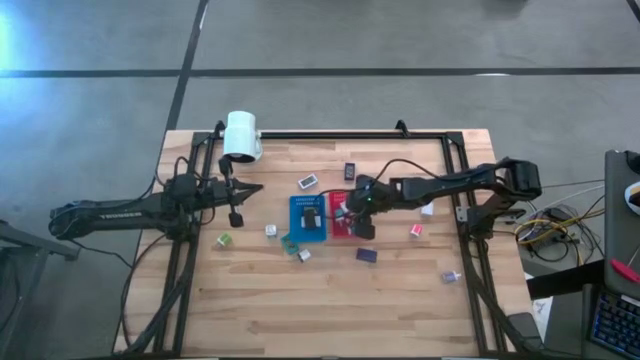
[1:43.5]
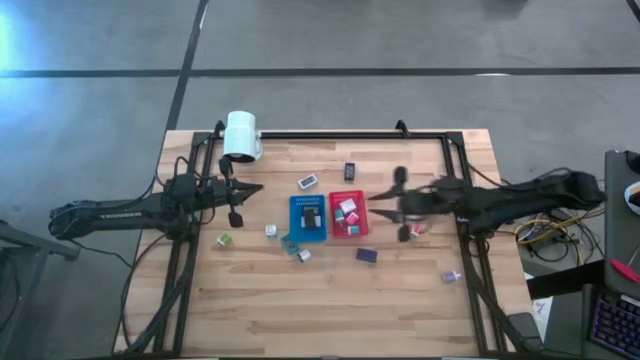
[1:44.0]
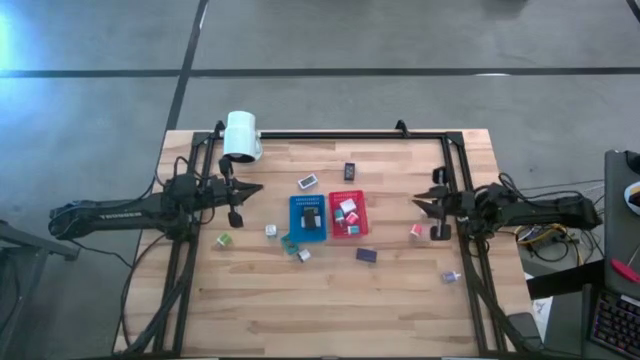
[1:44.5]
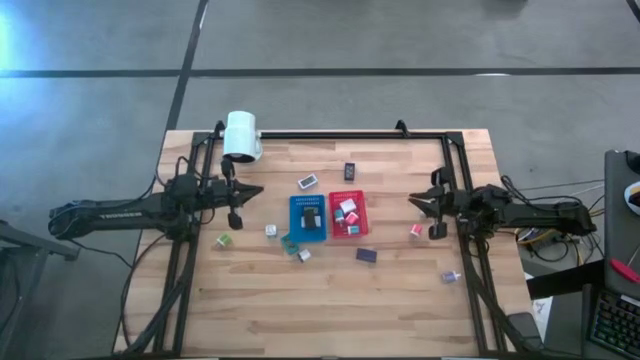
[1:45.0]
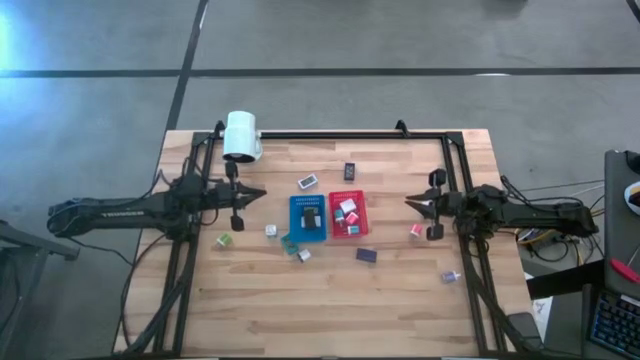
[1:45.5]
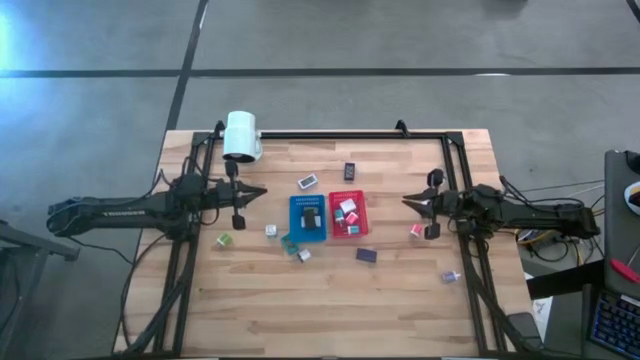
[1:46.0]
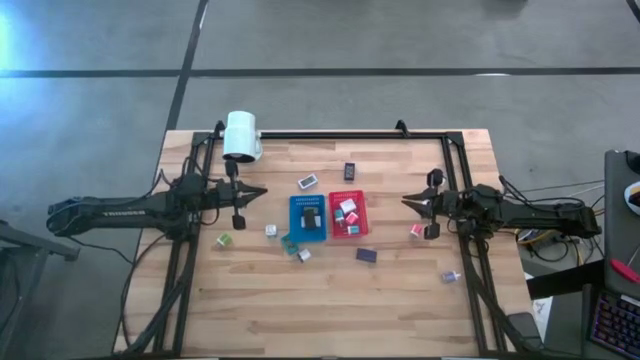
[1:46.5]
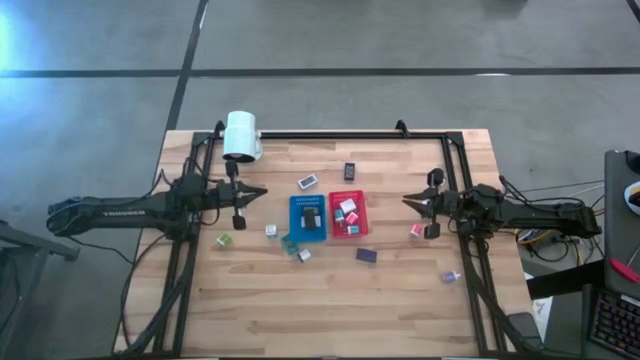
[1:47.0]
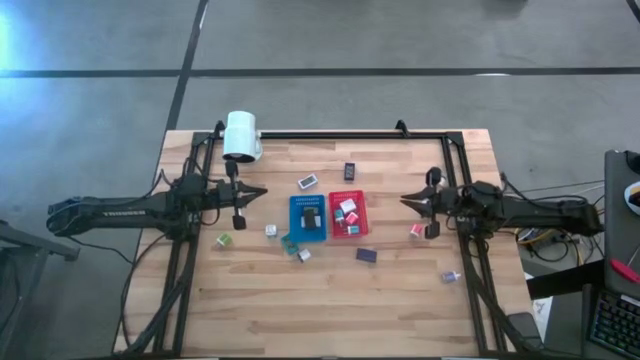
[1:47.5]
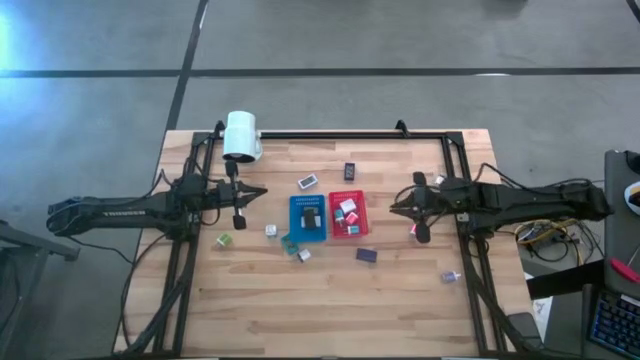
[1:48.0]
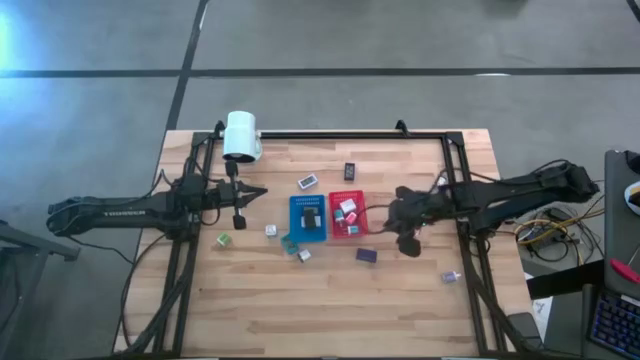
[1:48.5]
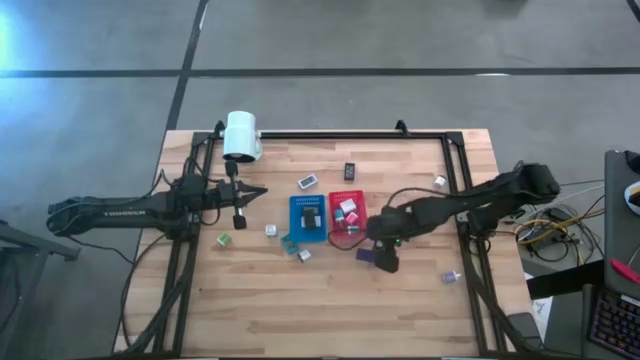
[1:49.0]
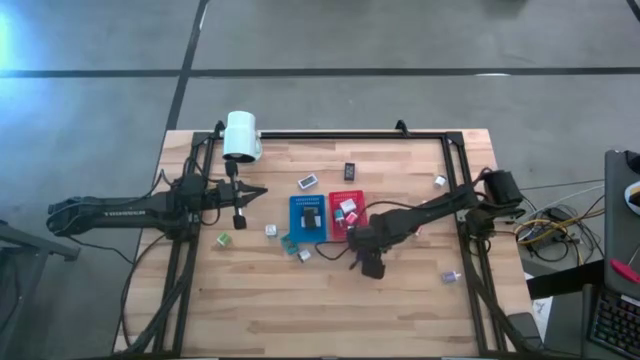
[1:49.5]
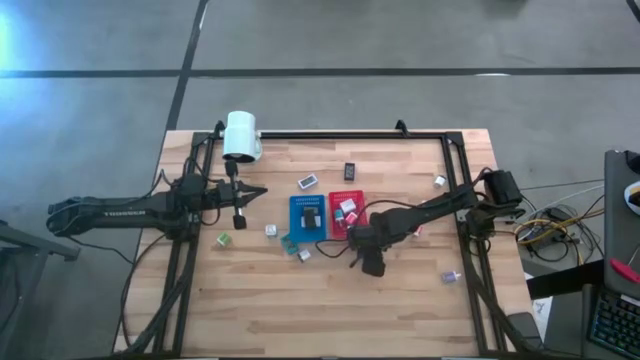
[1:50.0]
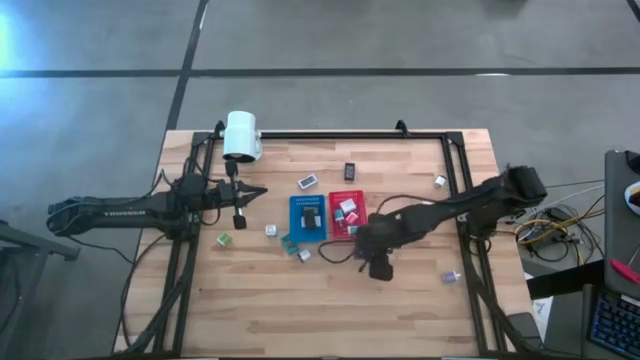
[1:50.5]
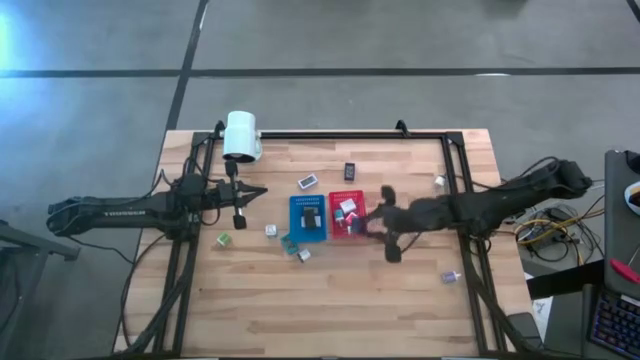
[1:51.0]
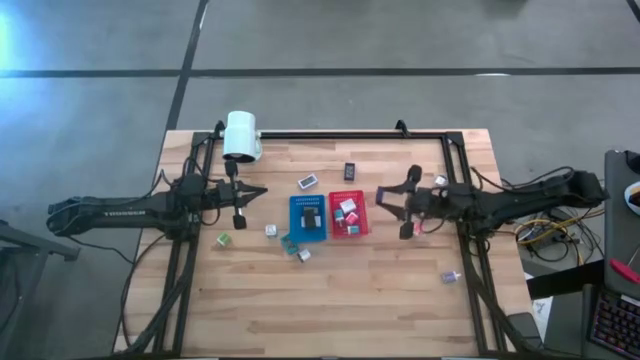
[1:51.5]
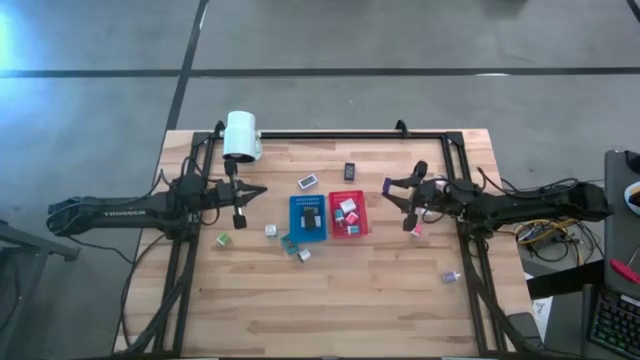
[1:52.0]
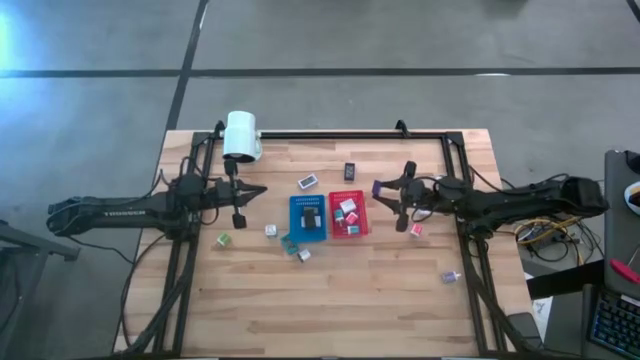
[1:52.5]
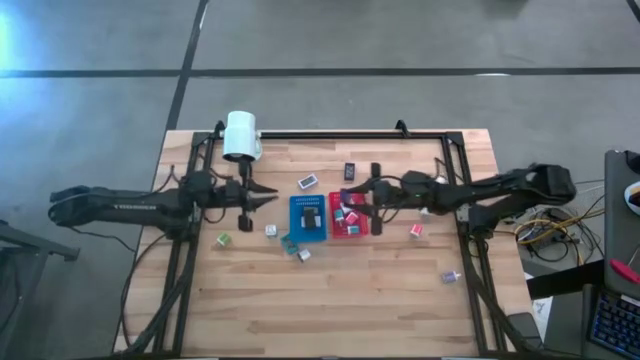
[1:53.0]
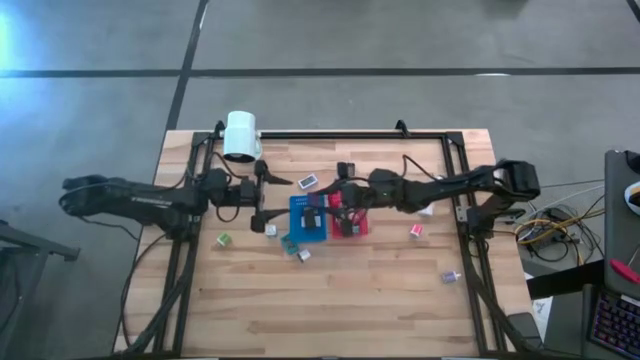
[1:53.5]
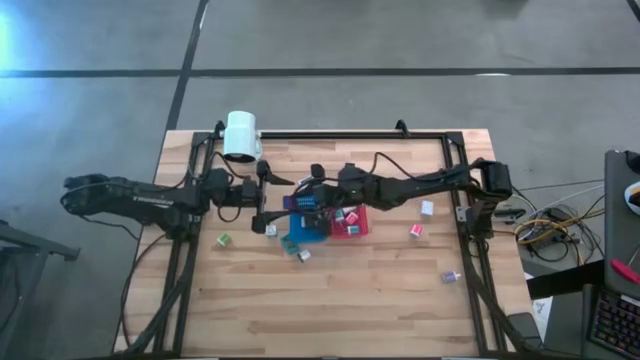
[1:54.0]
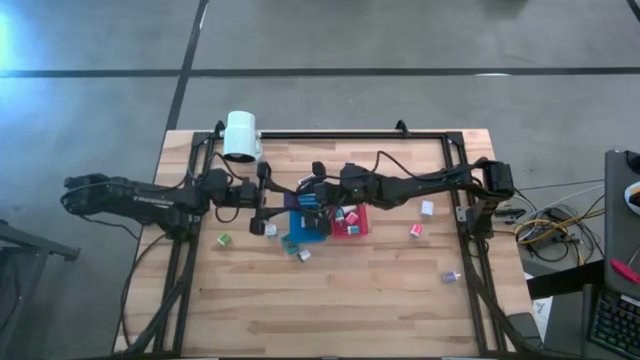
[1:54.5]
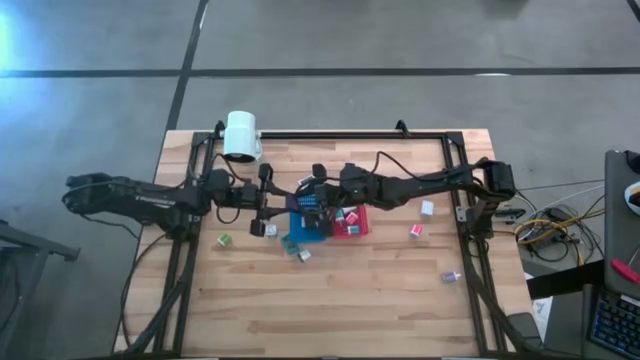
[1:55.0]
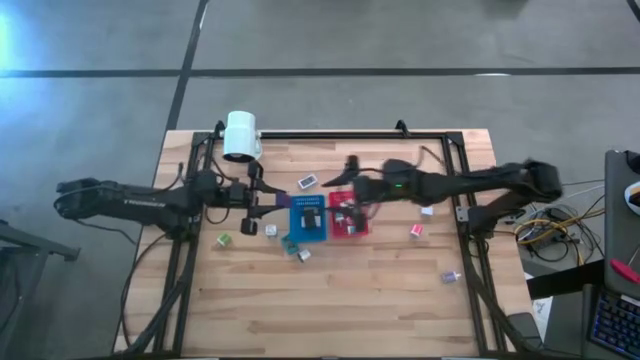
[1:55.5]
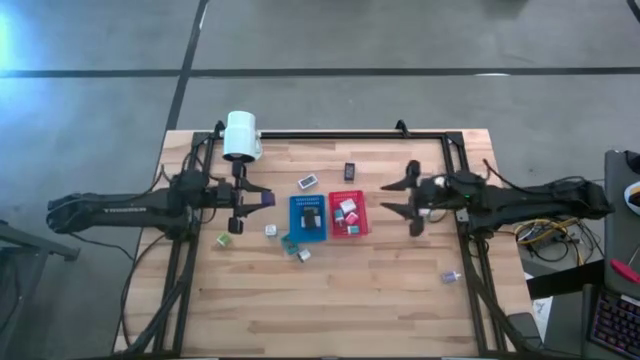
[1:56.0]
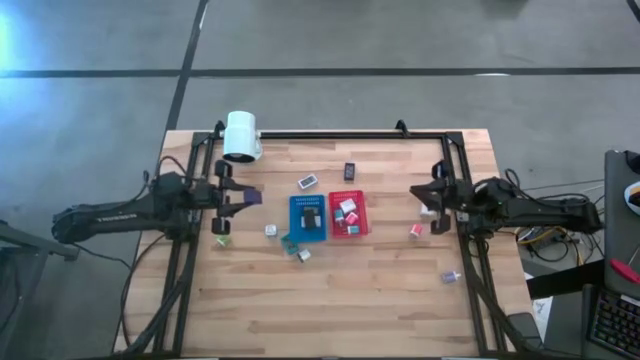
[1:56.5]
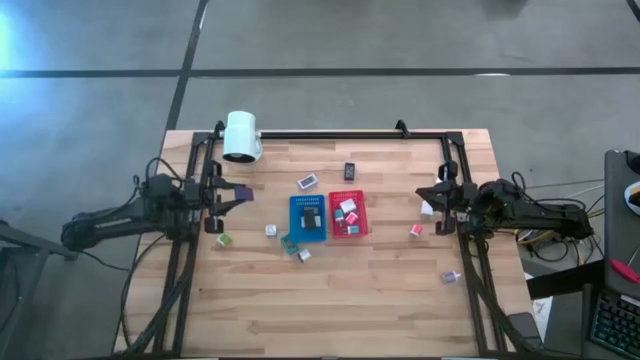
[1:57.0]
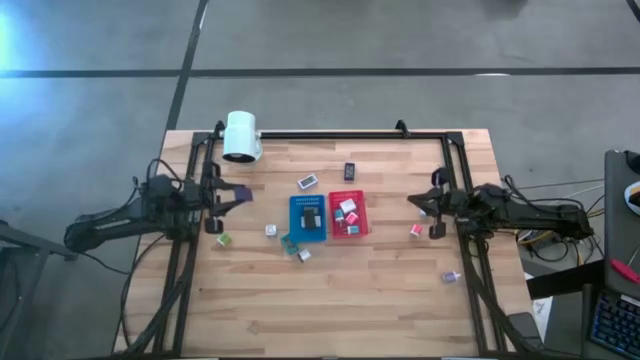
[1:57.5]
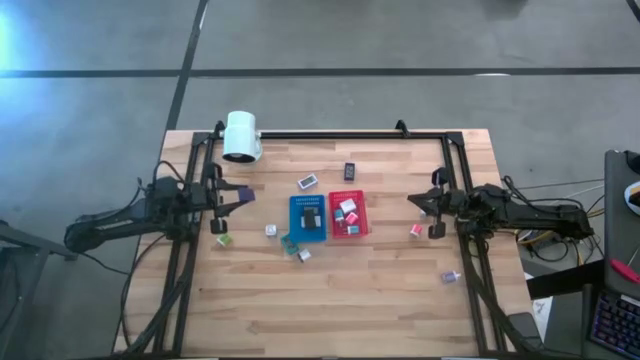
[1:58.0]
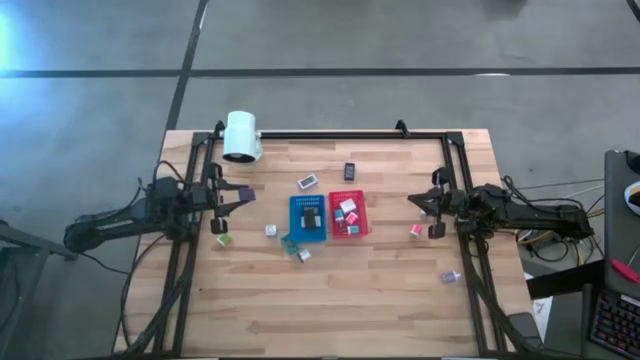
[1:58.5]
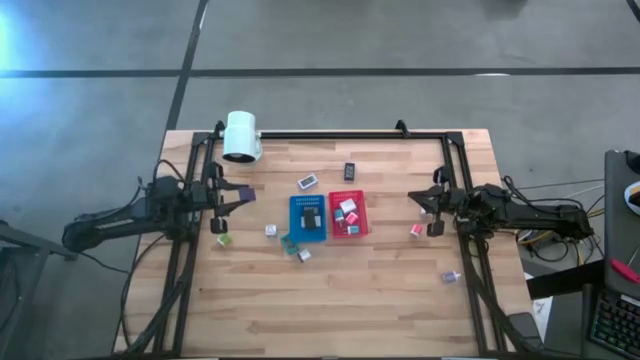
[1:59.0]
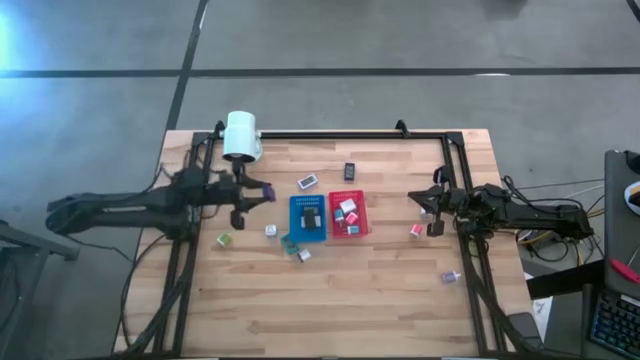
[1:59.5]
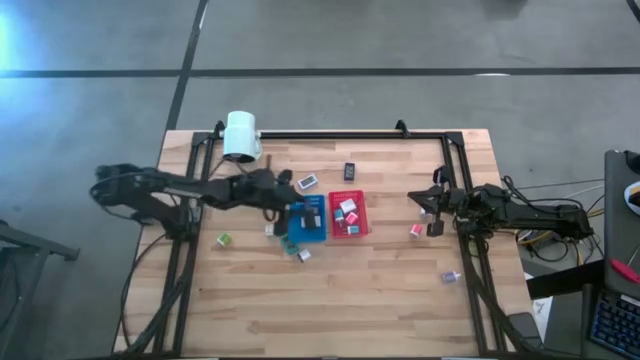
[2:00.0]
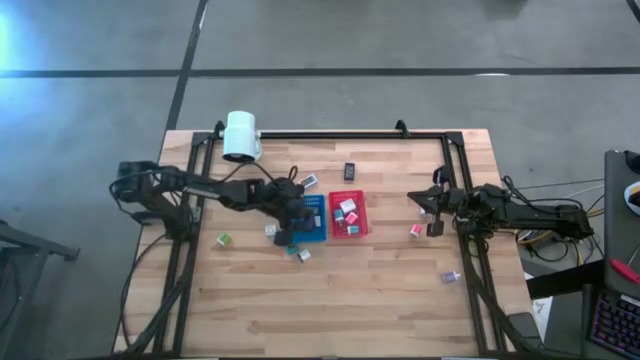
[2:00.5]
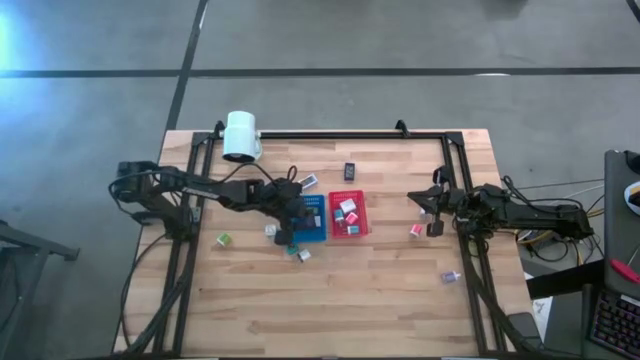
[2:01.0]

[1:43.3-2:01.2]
Task: Pick & Place Office items
Put the bottom dark blue digital clock into the blue bin

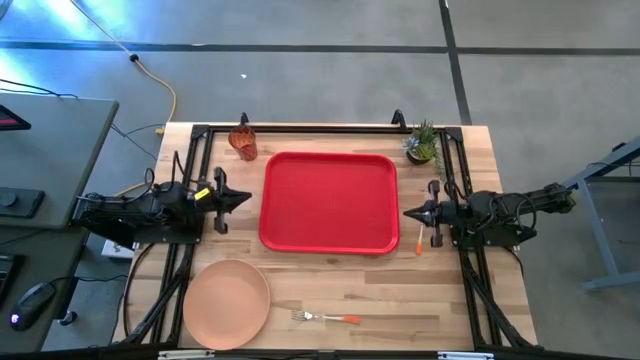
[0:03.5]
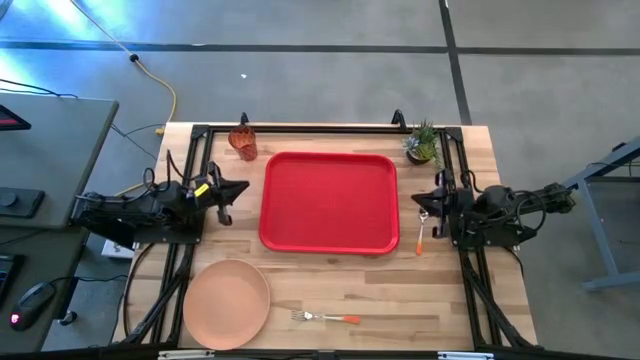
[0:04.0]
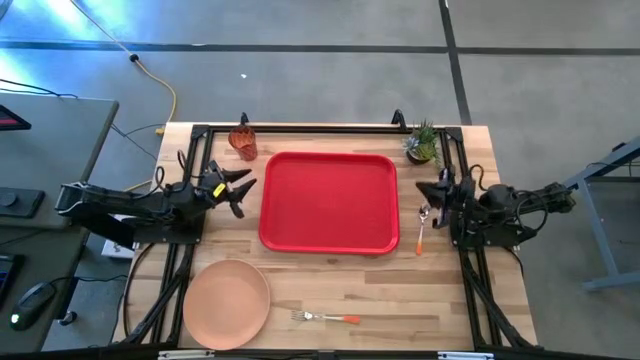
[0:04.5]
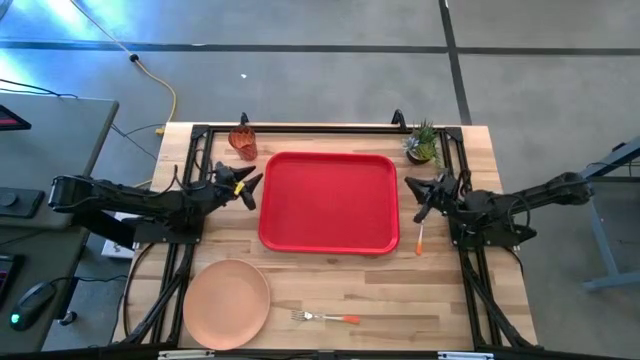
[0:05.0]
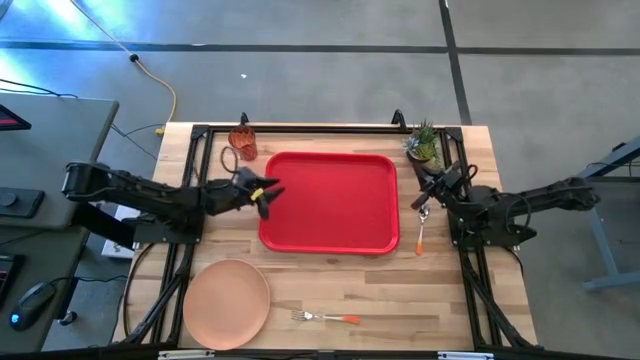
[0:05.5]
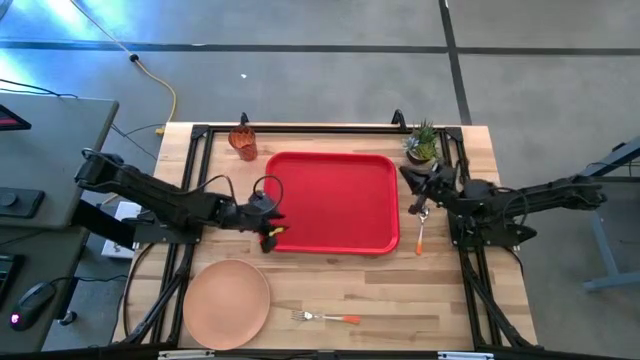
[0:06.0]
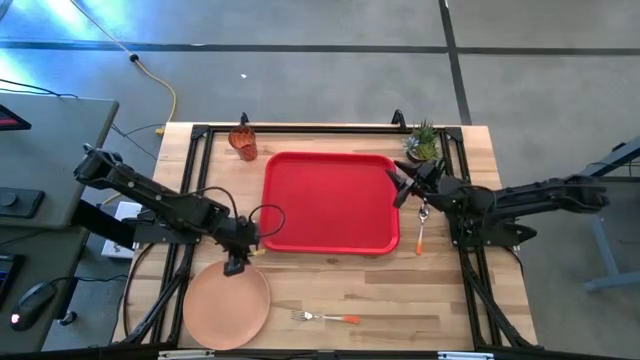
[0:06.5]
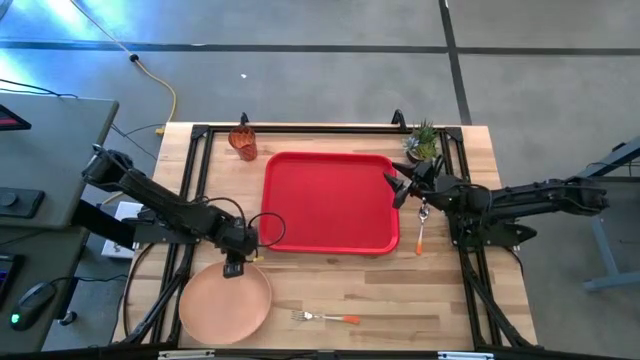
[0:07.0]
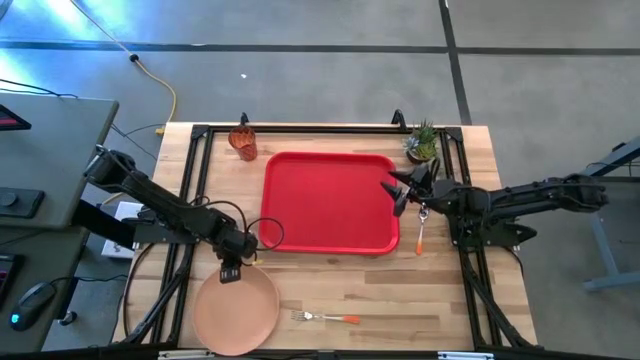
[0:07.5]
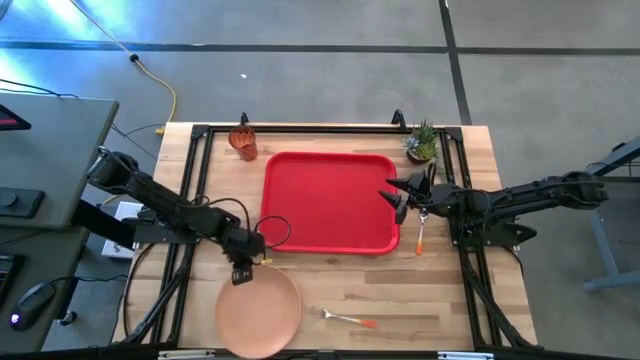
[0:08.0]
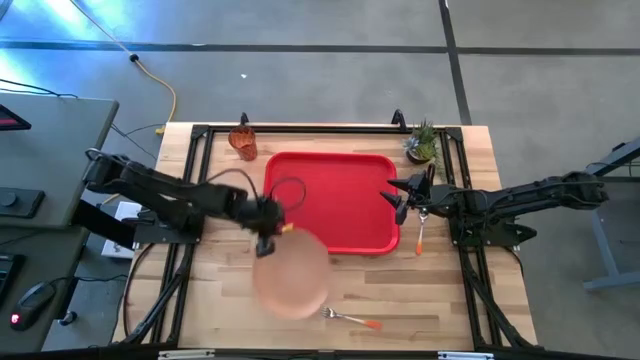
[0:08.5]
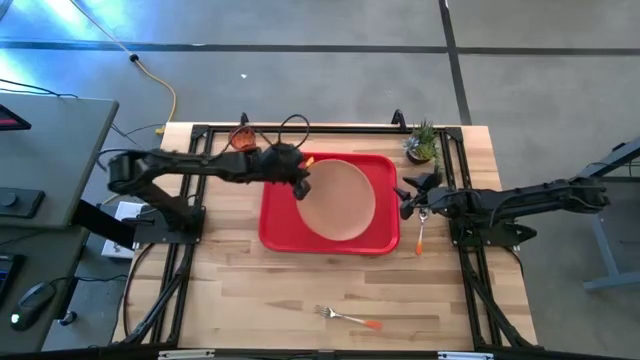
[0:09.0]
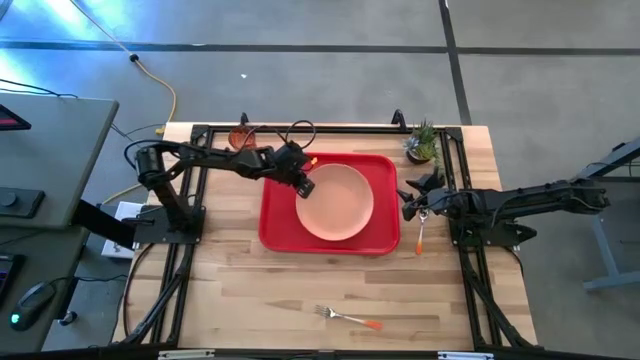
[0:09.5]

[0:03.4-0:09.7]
Task: Pick and place plate/cup/fork/spoon on tray
Put the orange plate on the red tray
